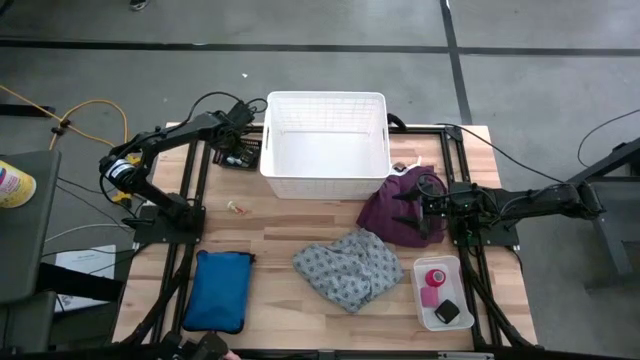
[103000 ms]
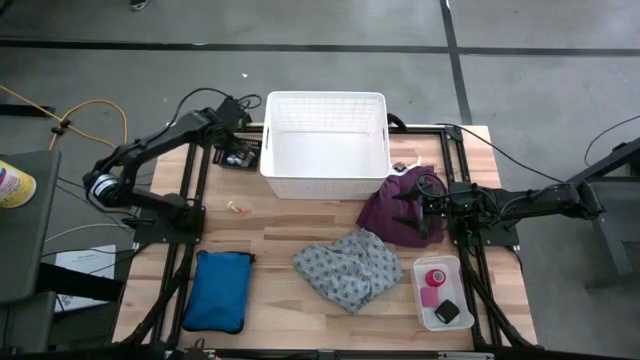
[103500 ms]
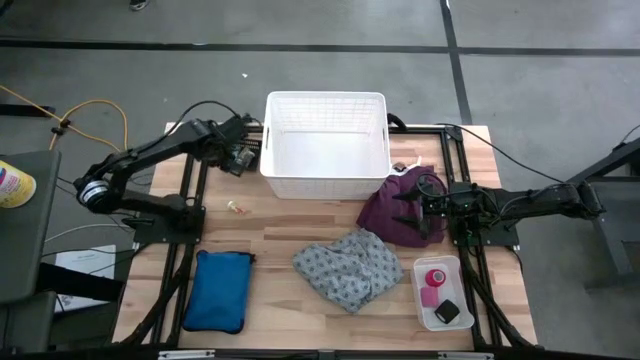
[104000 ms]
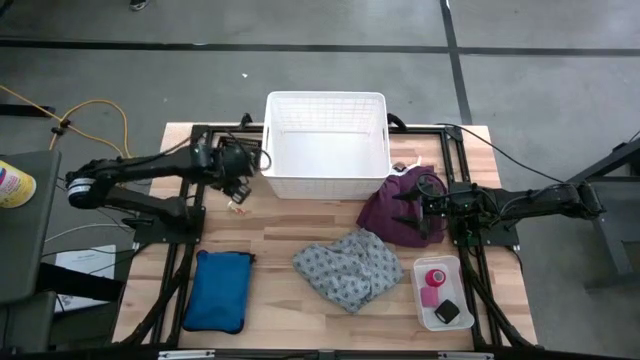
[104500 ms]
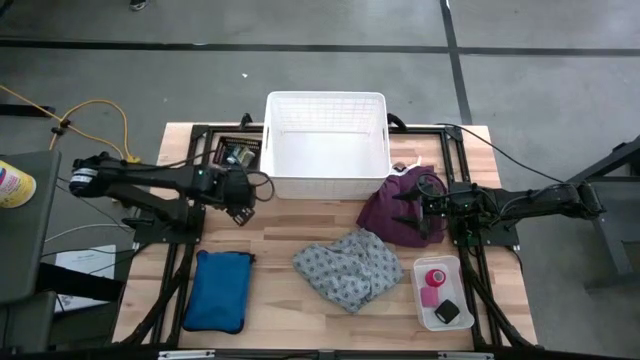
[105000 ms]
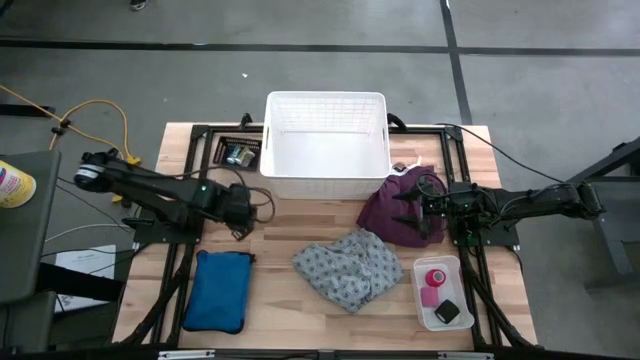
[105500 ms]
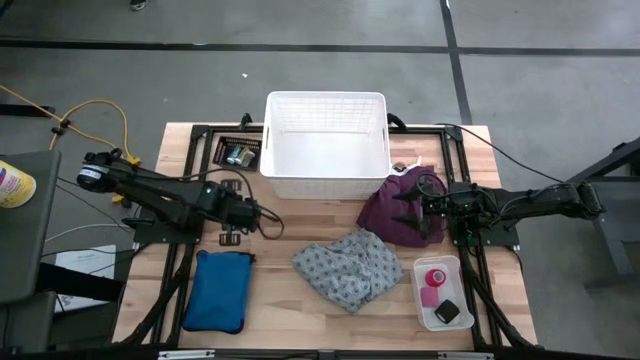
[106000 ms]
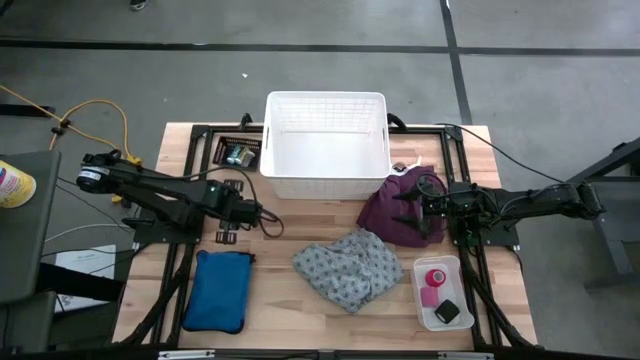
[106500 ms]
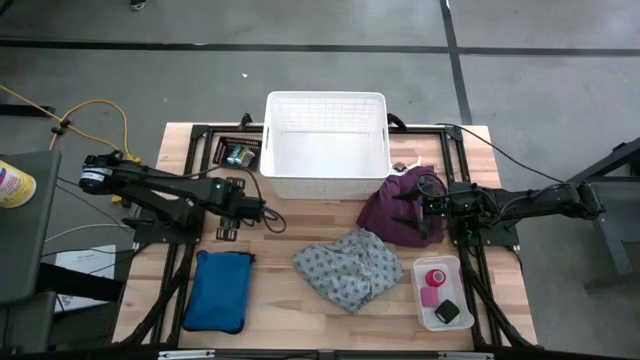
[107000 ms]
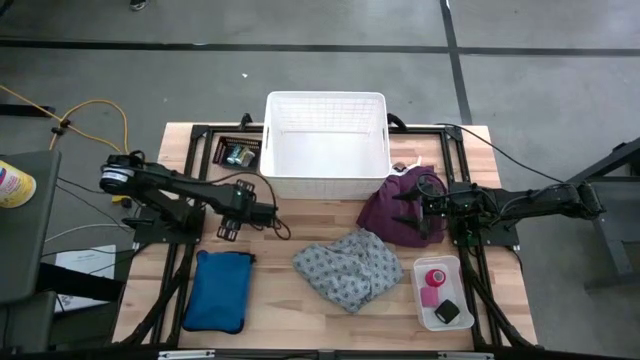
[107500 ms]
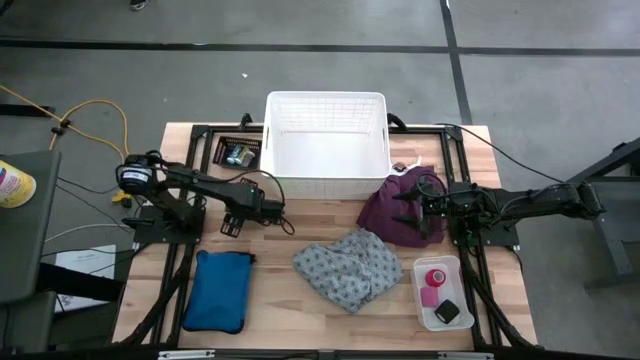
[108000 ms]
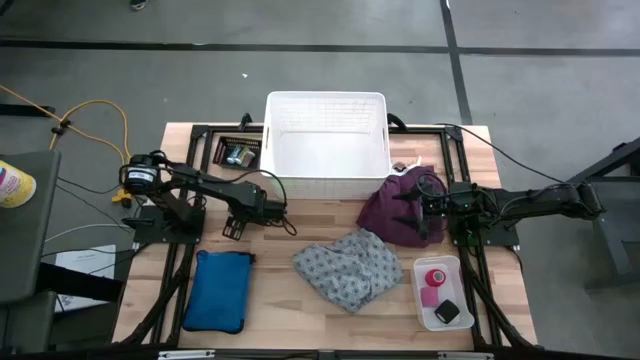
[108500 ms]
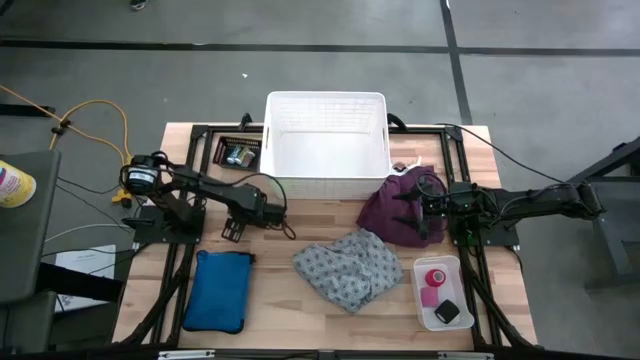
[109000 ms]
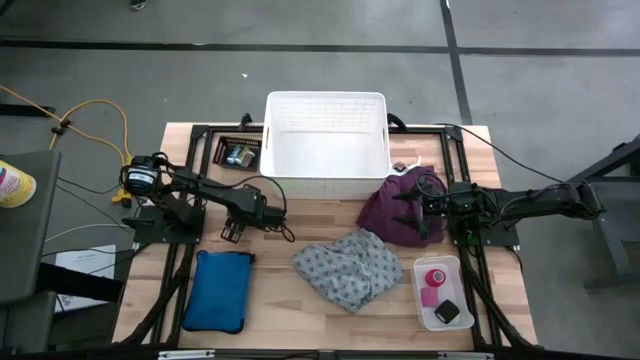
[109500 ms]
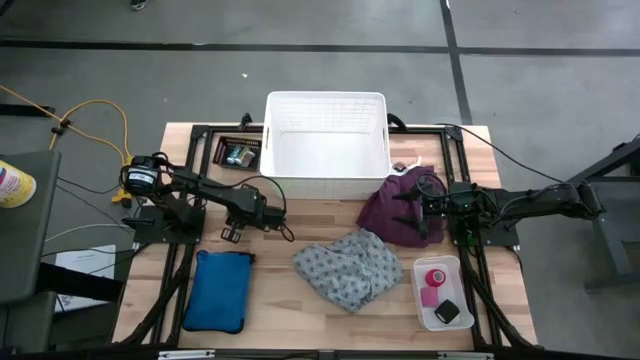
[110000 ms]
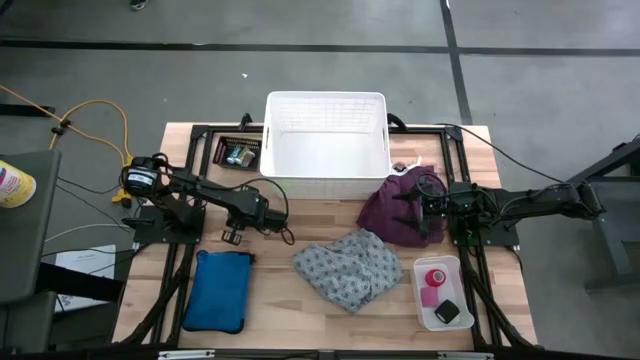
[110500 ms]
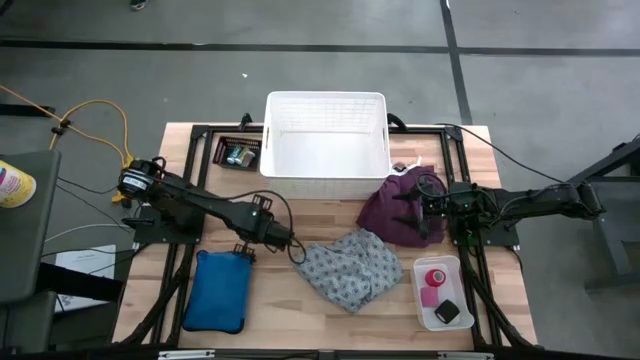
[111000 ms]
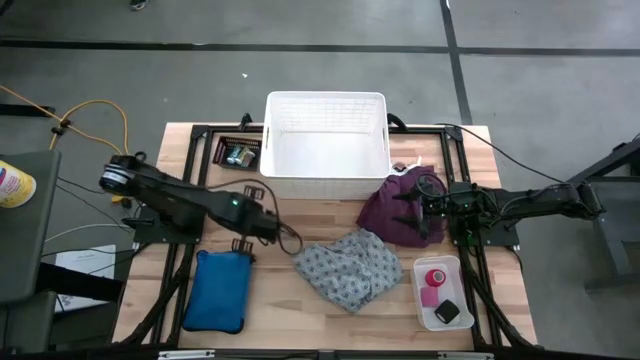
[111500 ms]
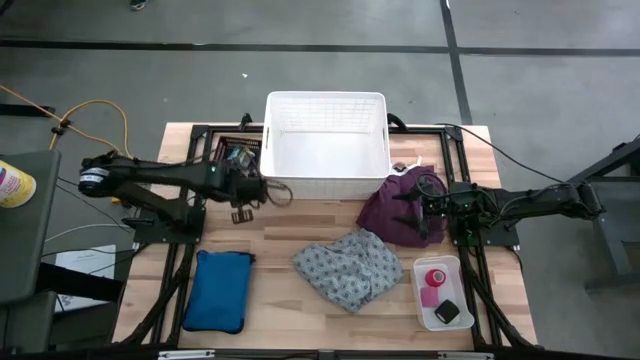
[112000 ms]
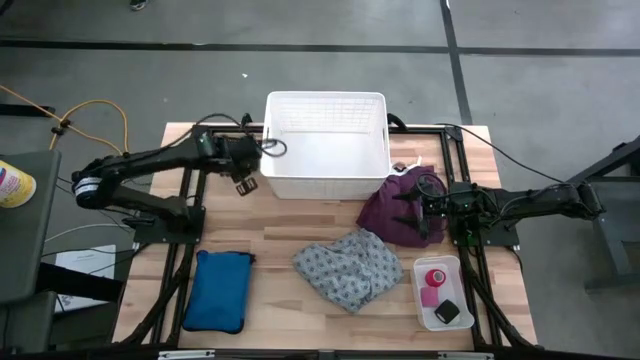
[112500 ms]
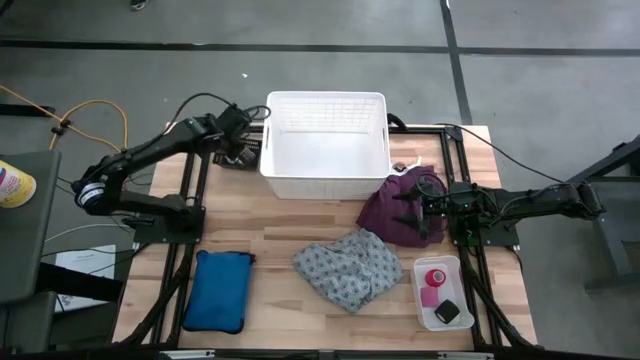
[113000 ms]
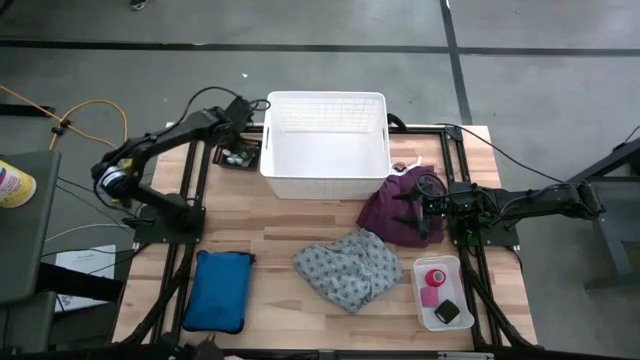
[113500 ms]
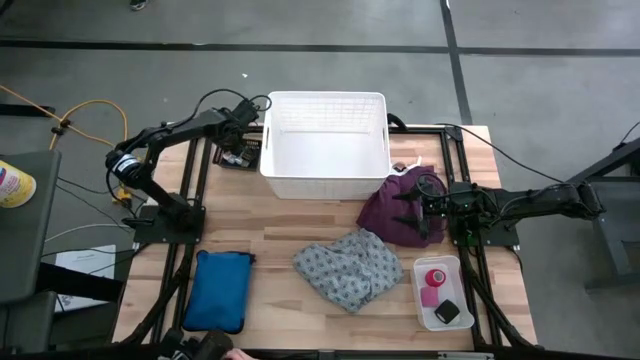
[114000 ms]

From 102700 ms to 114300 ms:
Task: Pick & place medical supplies in basket/bin
Put the yellow pill bottle into the black bin
